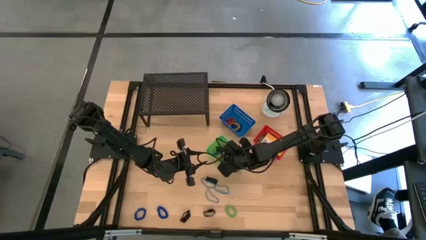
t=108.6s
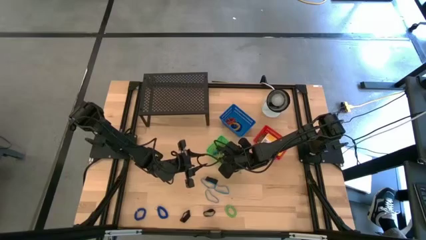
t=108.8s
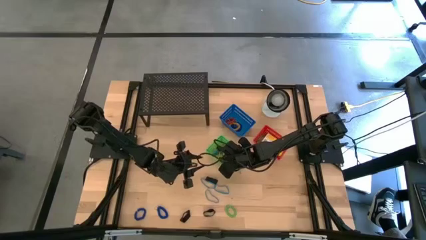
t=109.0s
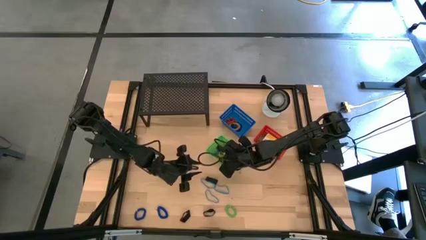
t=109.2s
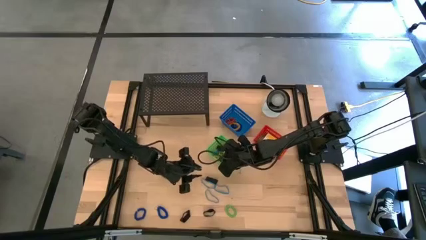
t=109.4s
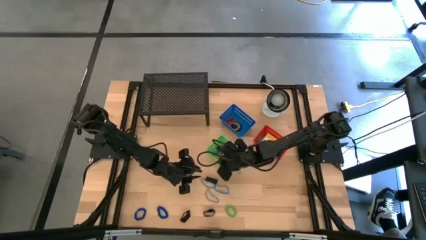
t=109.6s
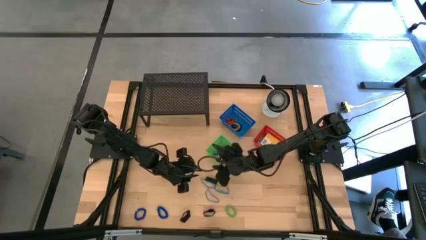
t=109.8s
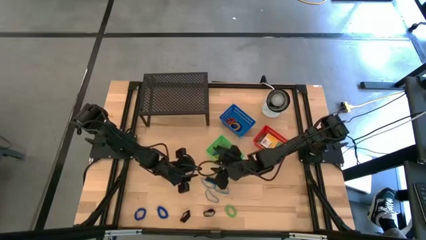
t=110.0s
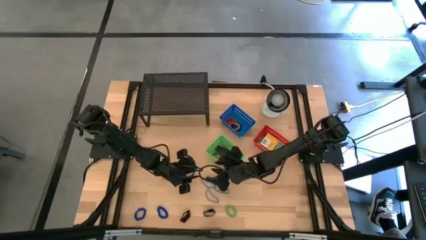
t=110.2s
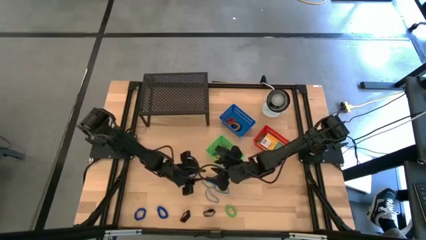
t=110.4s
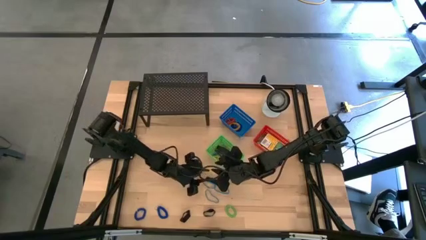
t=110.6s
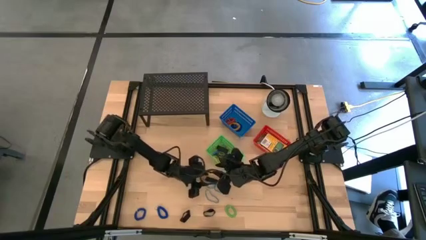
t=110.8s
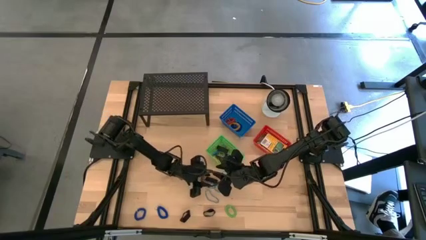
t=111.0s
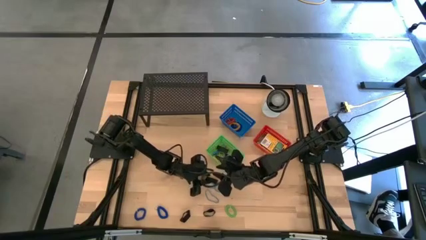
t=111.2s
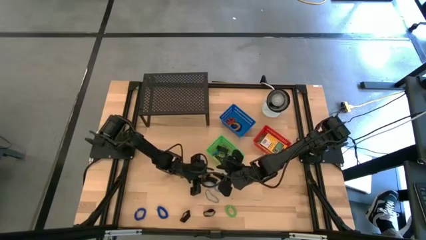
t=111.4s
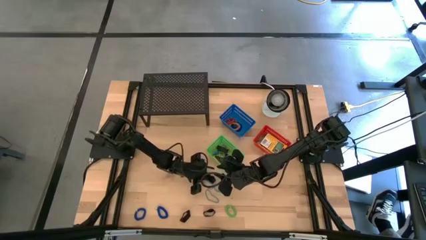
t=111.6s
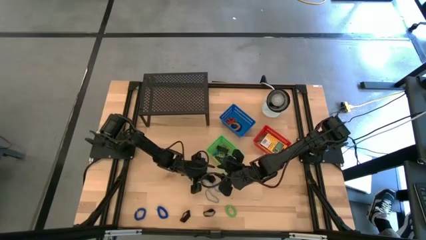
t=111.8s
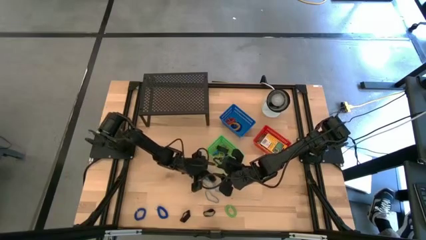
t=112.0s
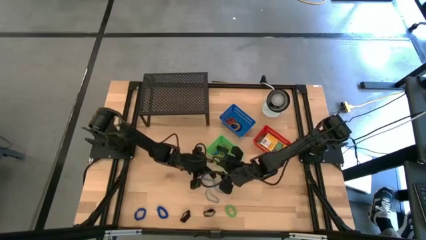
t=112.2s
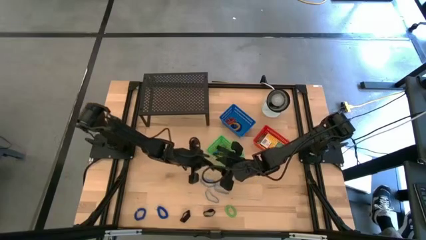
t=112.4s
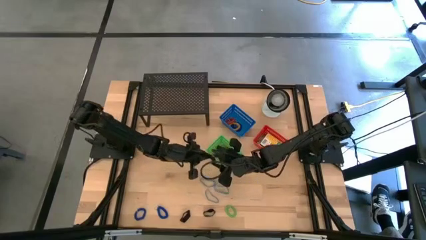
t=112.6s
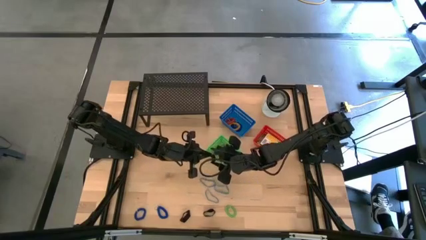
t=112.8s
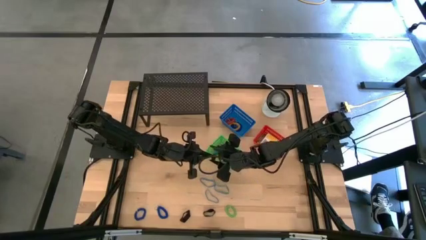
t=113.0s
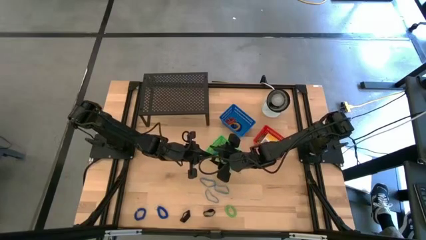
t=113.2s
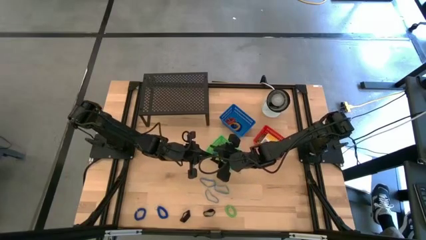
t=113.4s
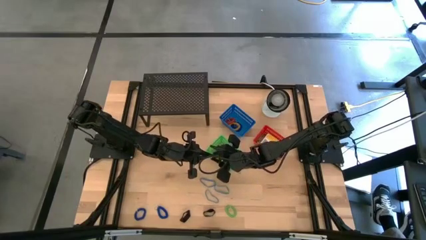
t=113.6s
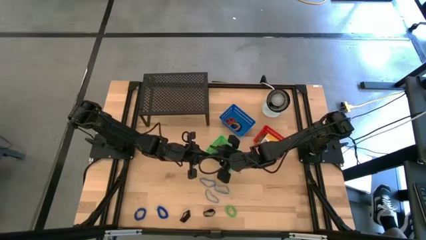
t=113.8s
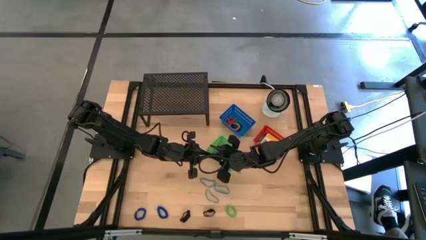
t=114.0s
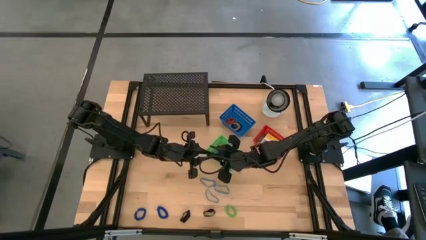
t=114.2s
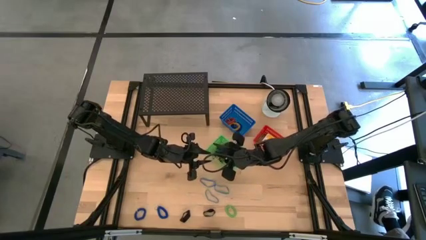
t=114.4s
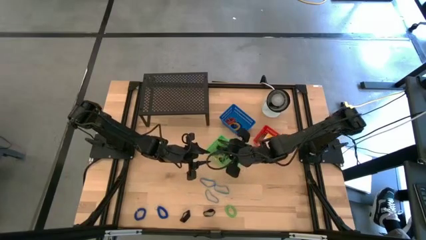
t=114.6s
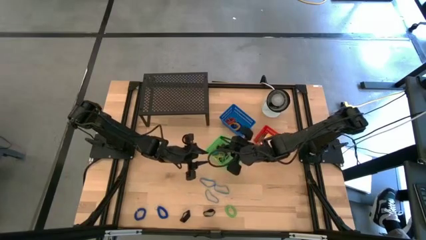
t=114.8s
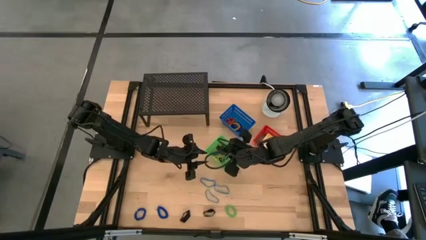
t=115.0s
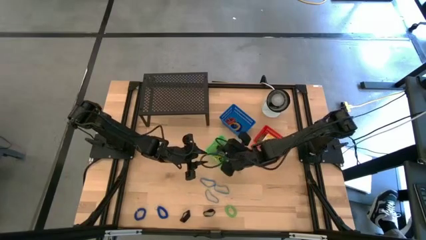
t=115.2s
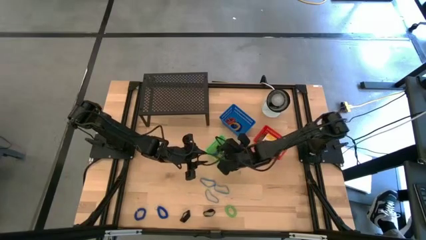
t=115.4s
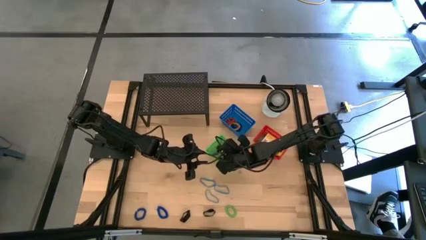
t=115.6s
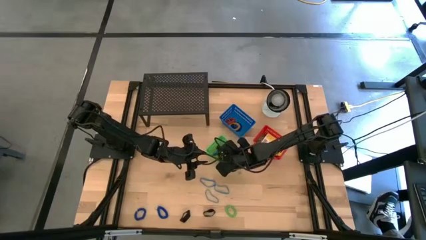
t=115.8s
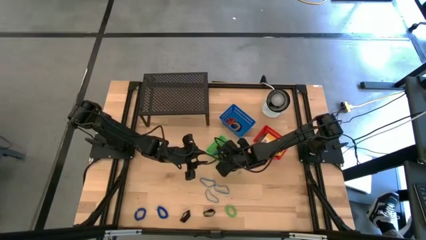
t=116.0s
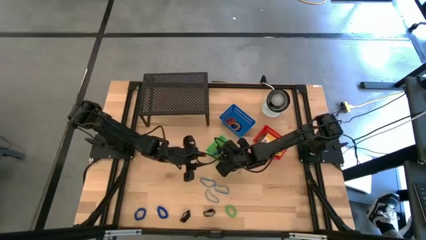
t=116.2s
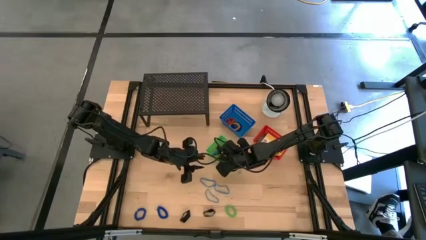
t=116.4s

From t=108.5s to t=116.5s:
Task: Pick & Place Office Desk Supplies
Put the black rubber band into the green basket

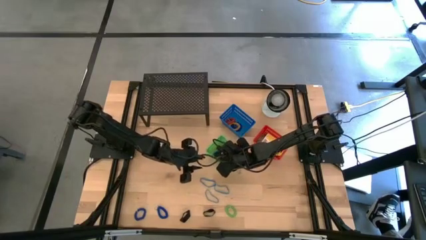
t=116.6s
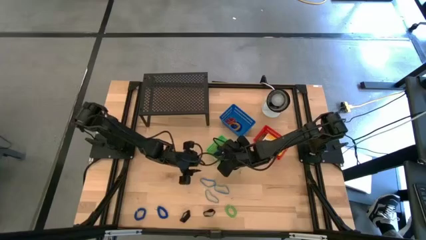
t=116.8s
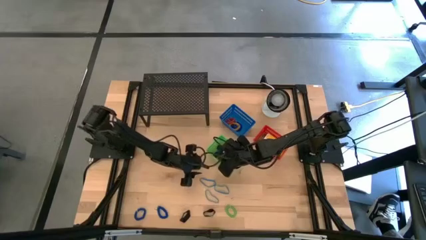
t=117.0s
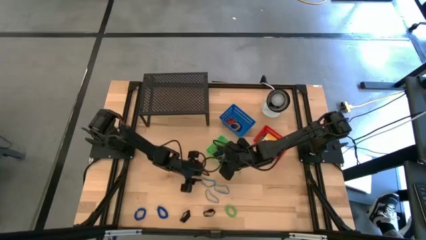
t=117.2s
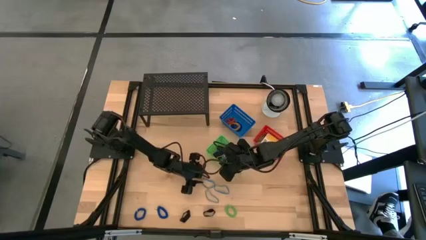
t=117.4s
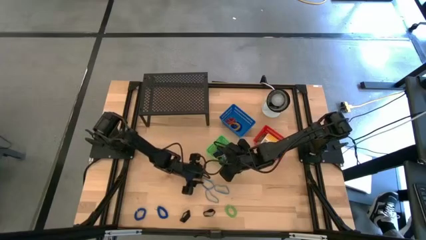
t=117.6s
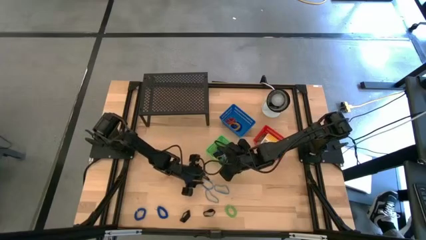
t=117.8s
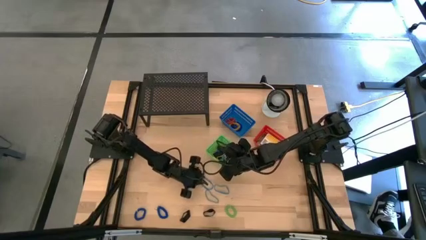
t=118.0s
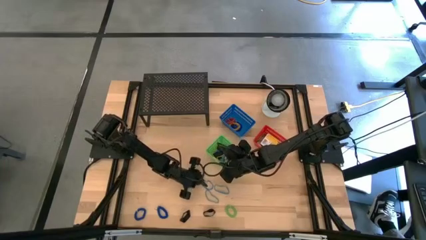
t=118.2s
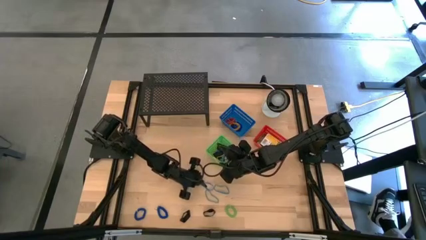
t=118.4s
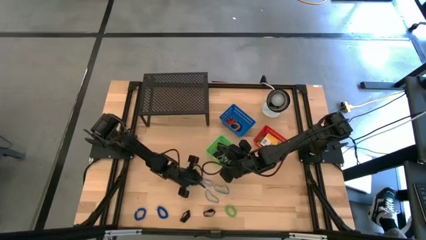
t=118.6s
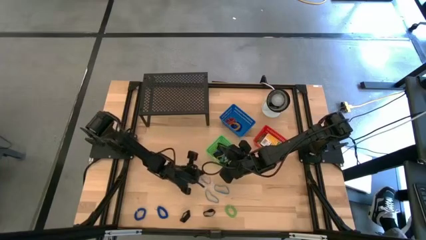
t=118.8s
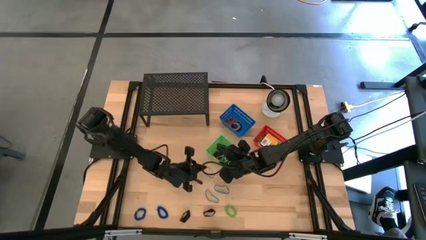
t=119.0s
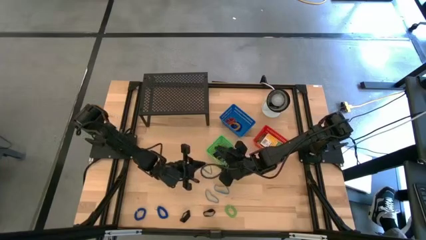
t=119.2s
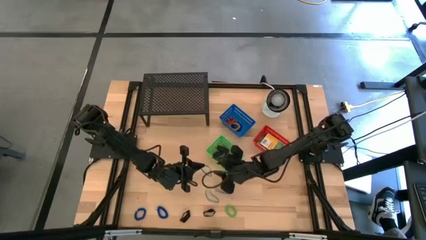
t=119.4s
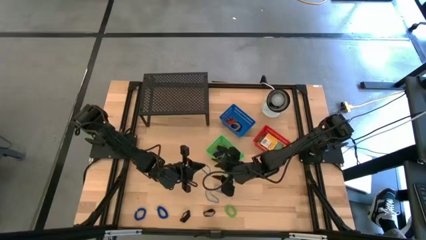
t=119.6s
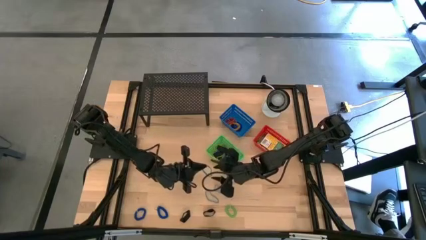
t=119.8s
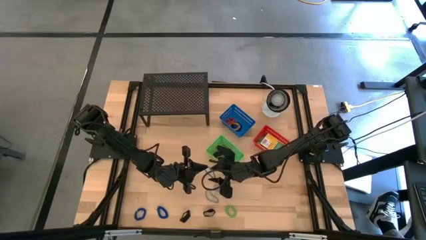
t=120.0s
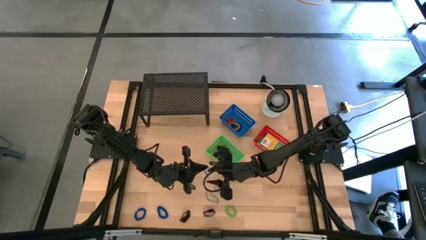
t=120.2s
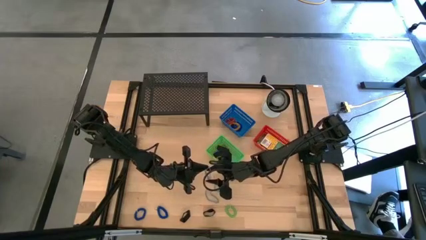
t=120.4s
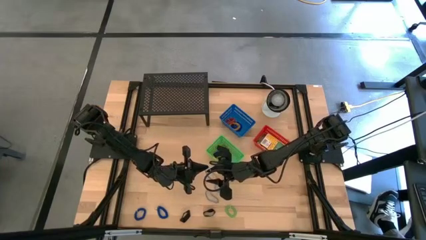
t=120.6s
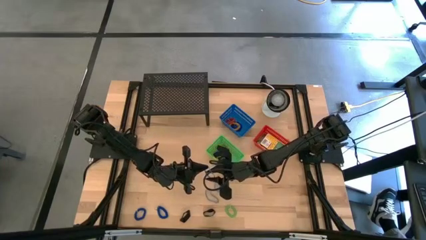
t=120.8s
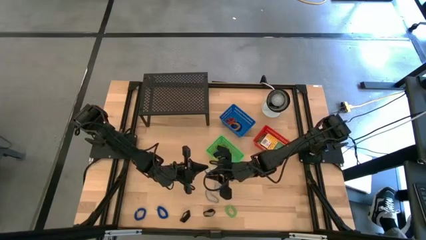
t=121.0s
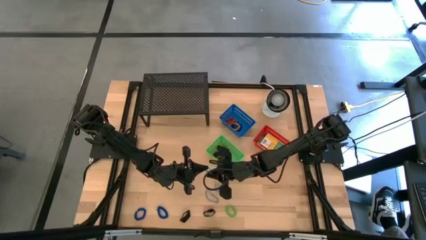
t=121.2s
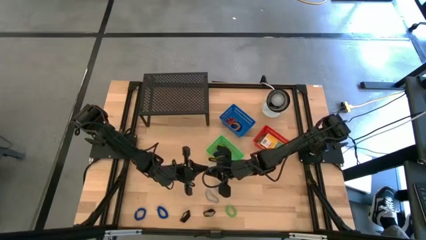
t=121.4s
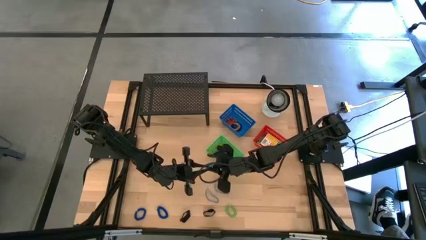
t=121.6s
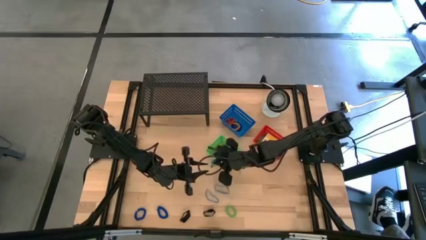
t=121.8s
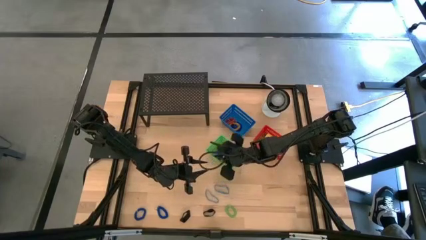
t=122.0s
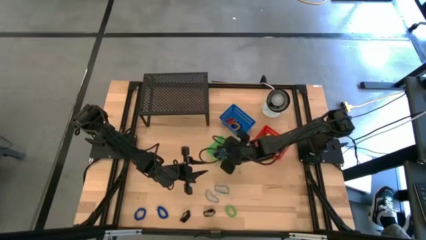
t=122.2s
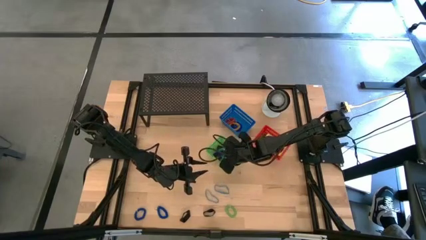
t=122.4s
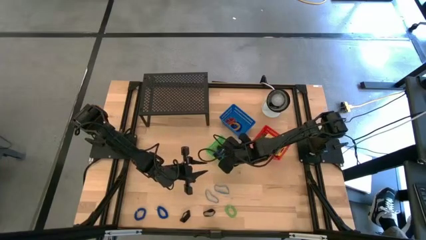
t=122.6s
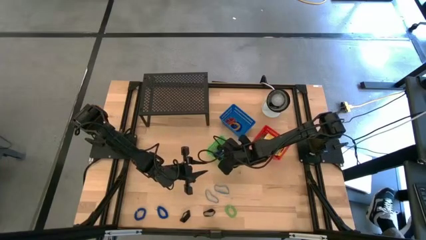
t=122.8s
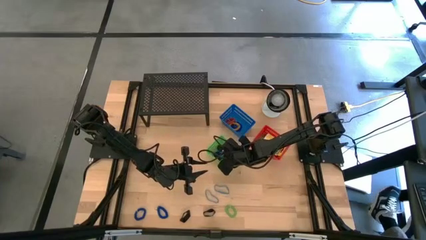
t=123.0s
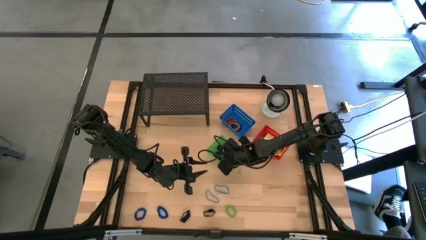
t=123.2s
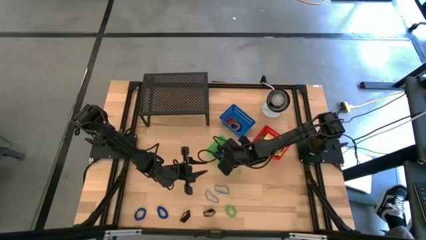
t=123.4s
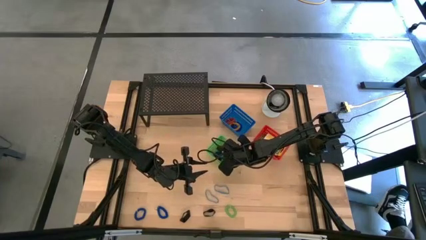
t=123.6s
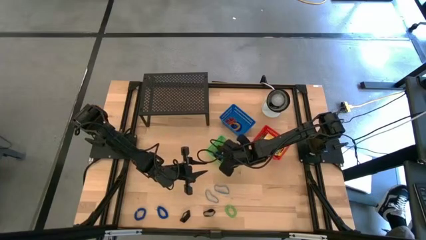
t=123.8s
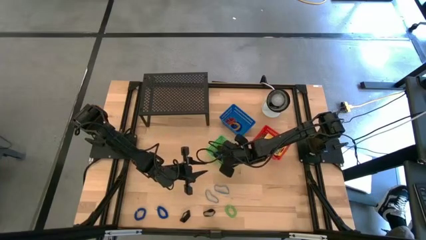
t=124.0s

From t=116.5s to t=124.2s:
Put the blue rubber band into the green basket
